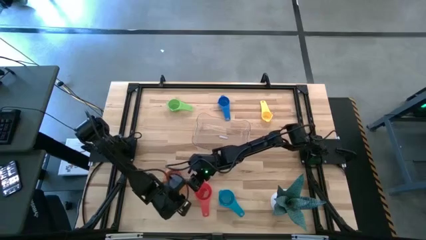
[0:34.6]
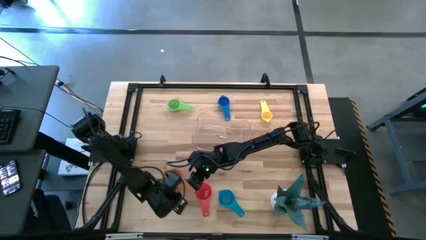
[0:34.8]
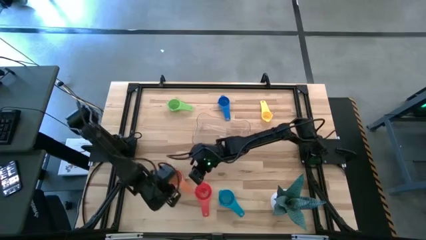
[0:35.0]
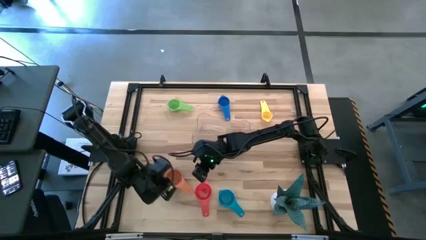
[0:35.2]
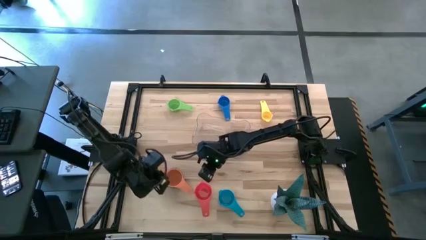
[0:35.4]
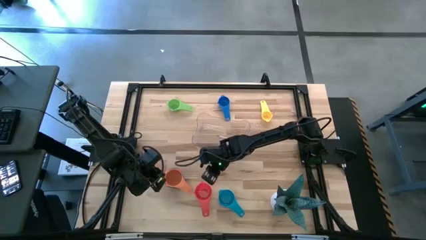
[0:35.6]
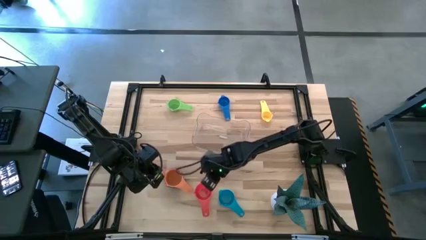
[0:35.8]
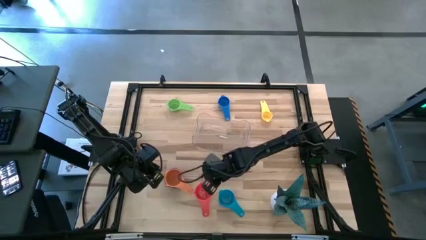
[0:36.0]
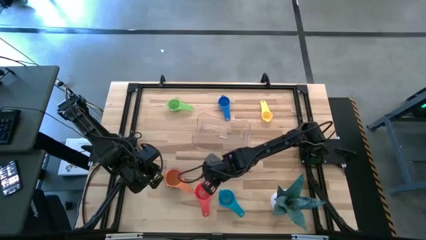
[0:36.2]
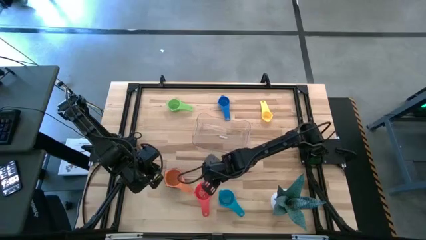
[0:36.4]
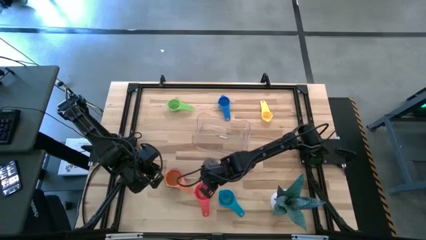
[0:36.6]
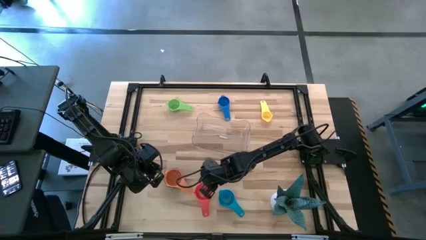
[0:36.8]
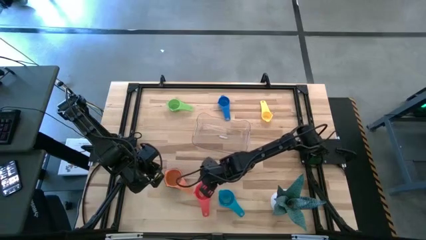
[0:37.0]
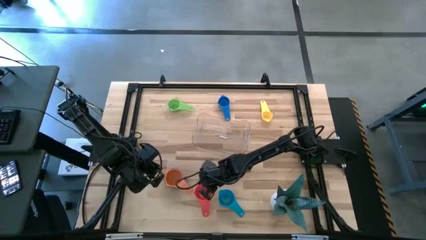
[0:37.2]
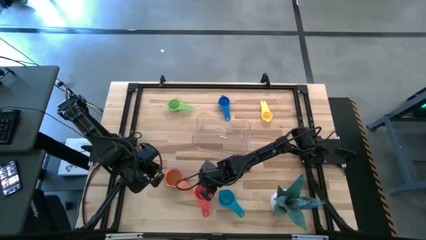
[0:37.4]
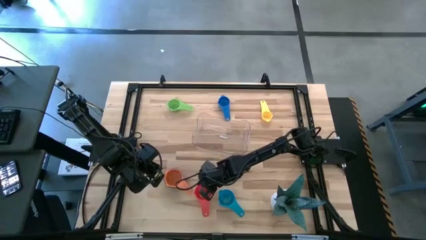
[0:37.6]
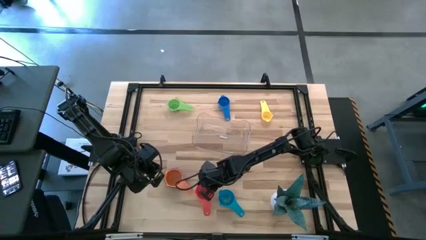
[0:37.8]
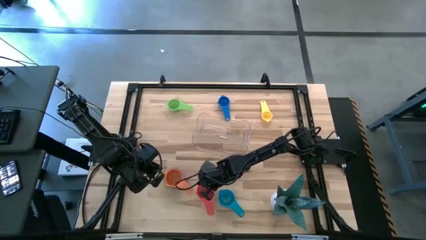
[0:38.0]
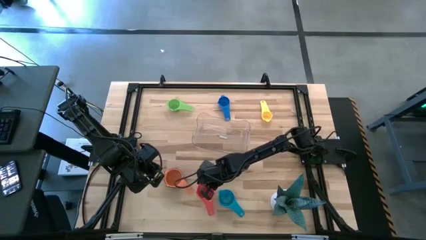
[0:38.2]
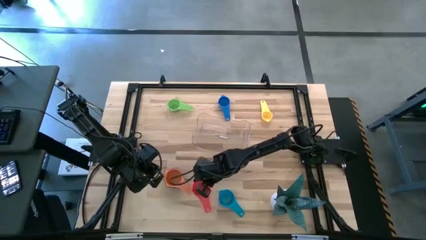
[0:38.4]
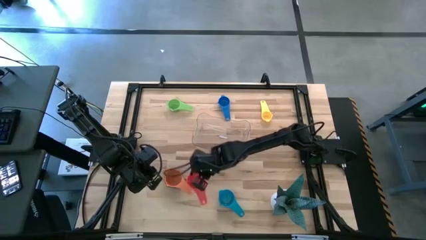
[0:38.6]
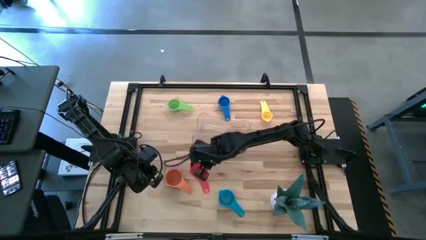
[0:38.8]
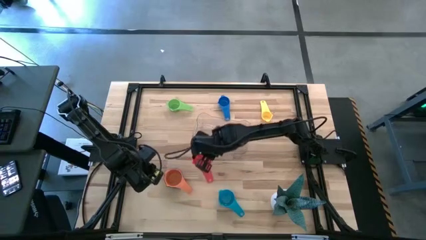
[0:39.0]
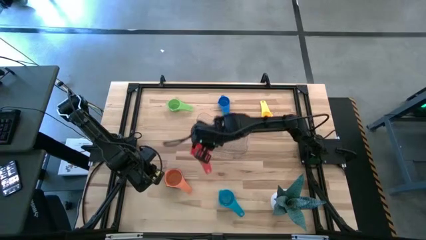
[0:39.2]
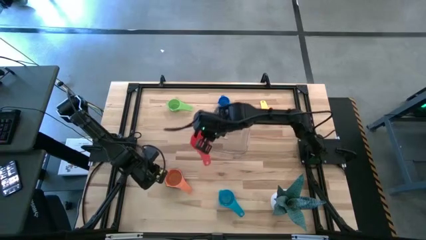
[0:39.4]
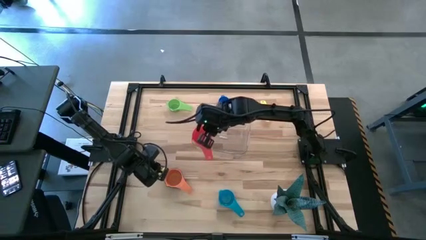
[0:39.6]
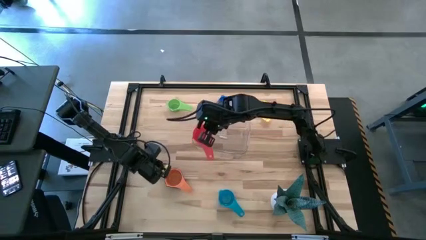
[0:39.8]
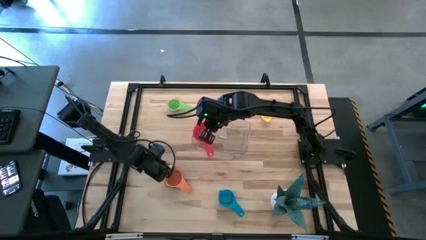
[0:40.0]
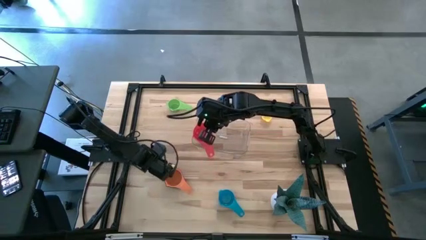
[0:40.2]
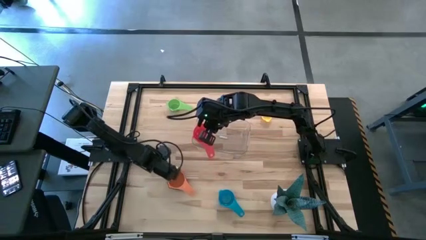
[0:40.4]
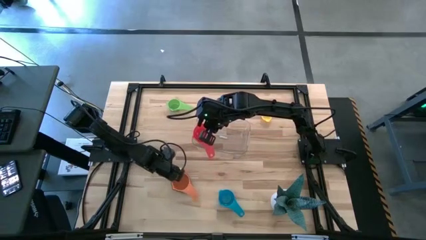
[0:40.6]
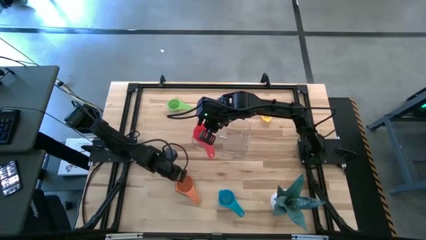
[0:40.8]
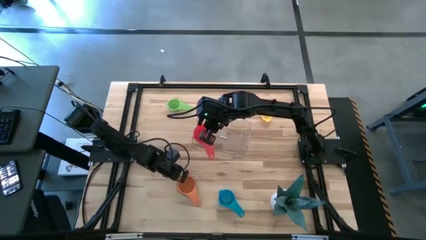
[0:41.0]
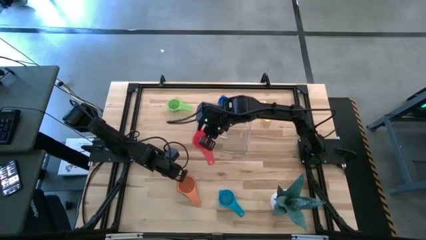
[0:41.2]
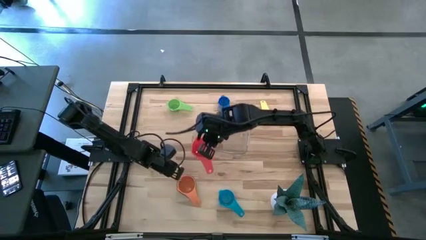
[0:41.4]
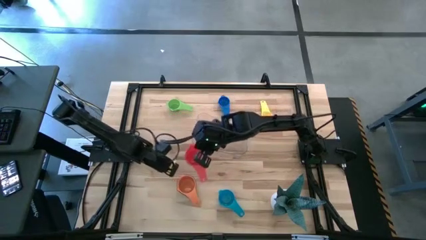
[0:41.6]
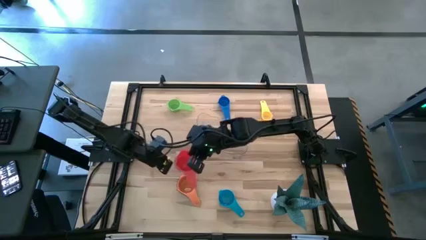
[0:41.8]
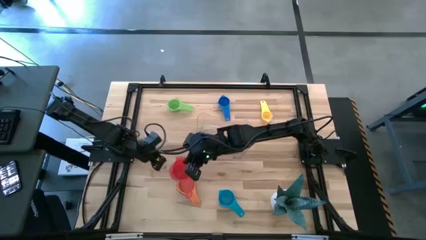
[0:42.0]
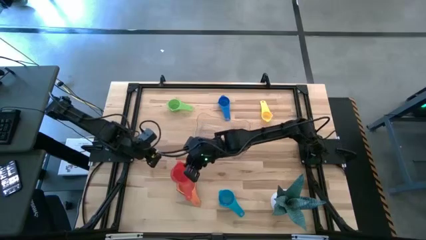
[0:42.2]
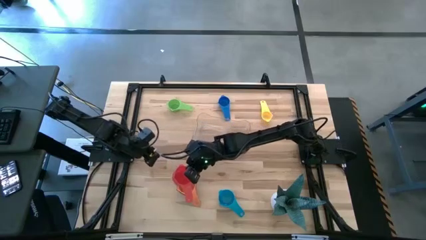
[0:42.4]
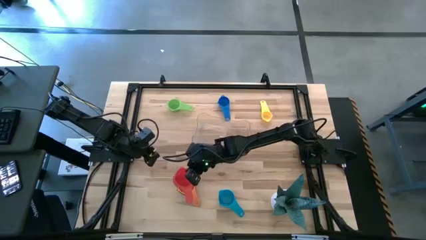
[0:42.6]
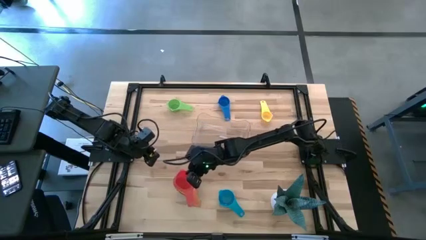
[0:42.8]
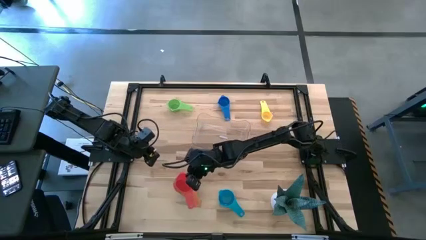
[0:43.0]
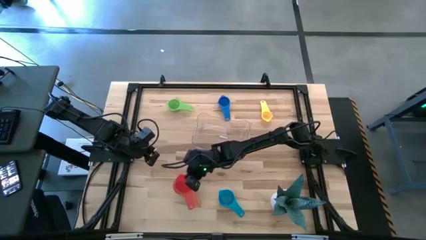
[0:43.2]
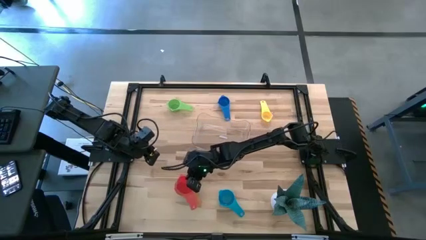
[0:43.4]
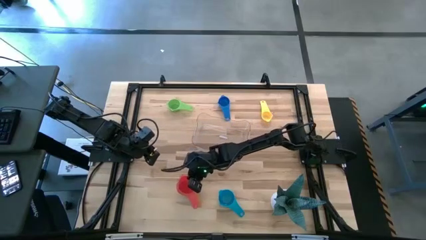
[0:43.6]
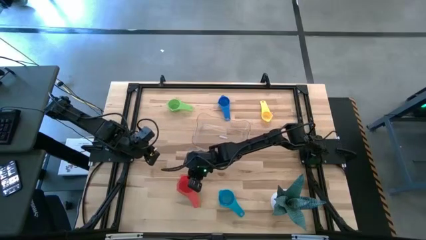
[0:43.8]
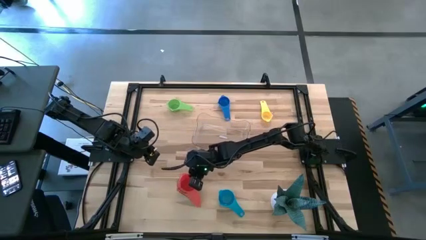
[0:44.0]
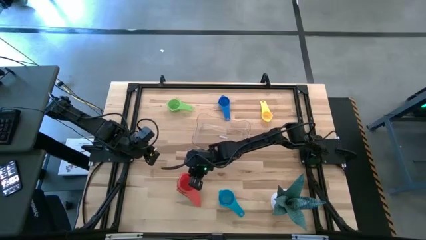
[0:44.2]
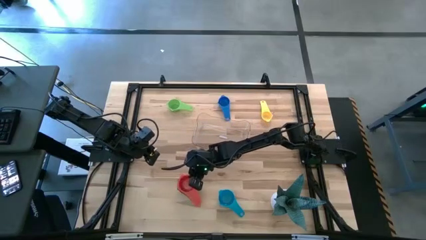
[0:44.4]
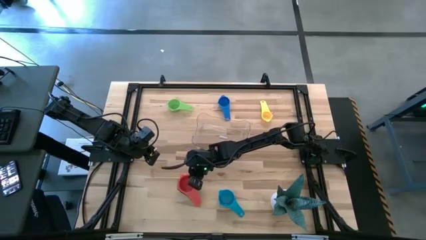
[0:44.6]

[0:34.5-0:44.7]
Task: Nest measuring cups in basket
Stack the red measuring cup on the orange measuring cup

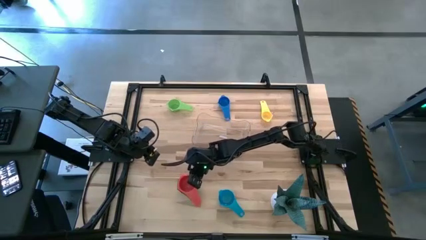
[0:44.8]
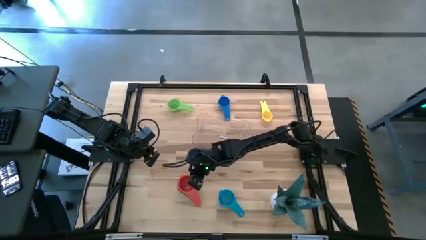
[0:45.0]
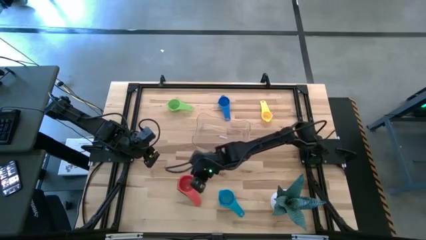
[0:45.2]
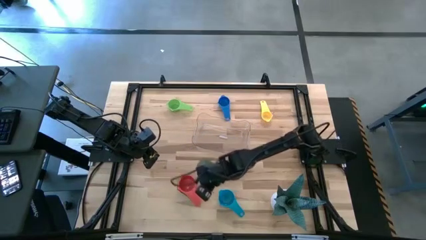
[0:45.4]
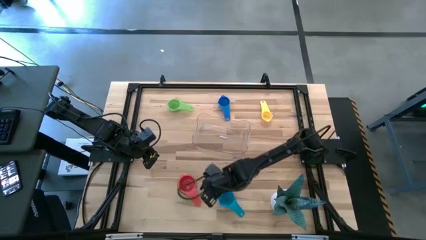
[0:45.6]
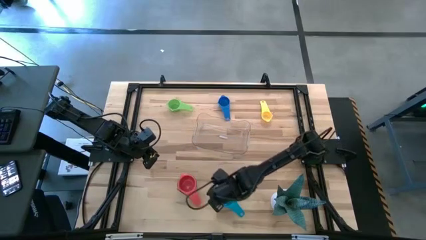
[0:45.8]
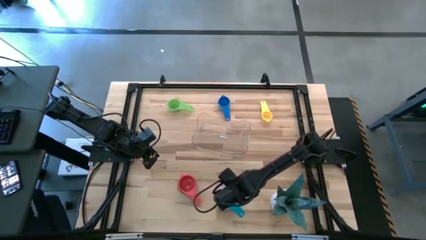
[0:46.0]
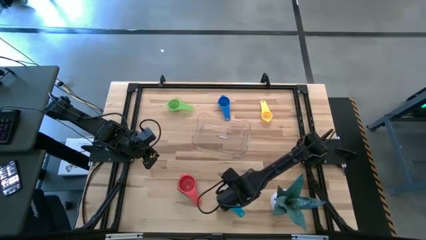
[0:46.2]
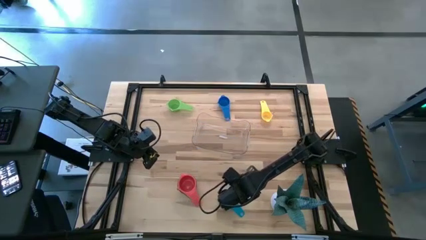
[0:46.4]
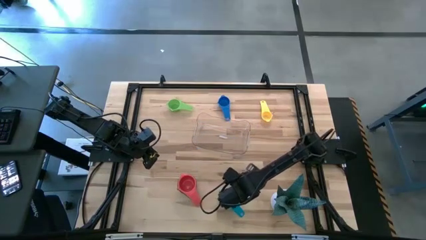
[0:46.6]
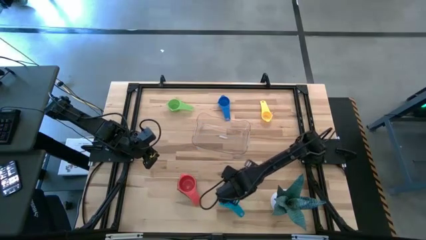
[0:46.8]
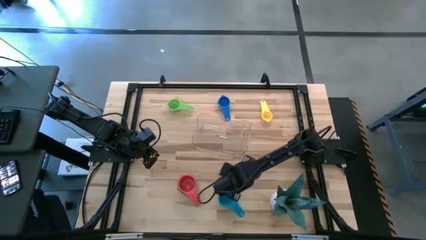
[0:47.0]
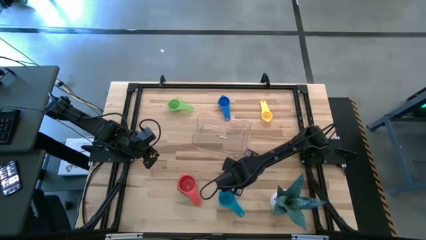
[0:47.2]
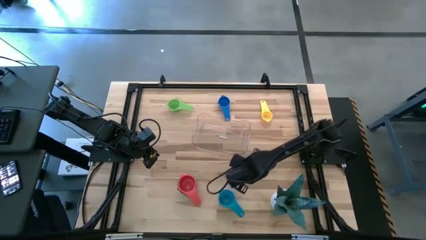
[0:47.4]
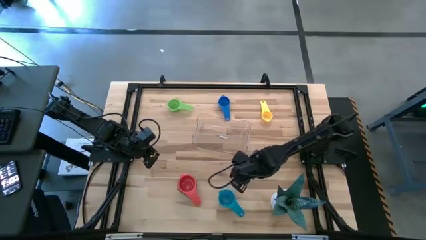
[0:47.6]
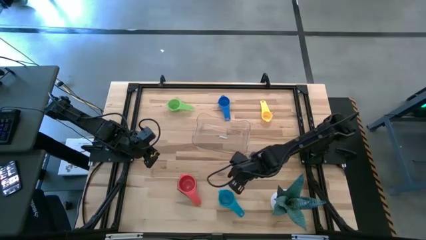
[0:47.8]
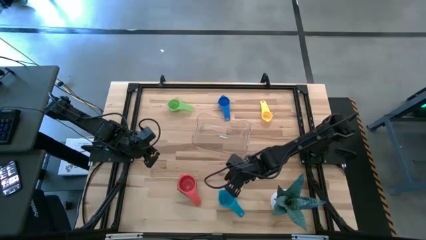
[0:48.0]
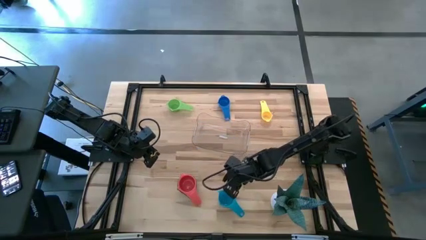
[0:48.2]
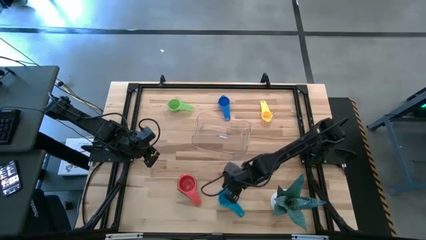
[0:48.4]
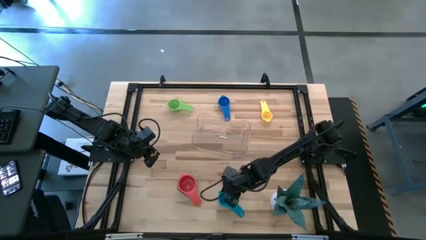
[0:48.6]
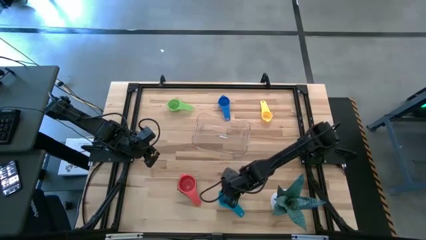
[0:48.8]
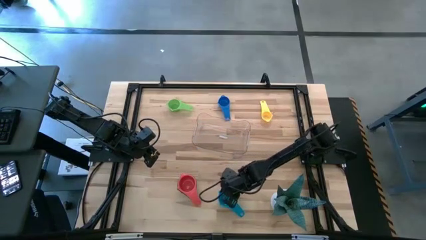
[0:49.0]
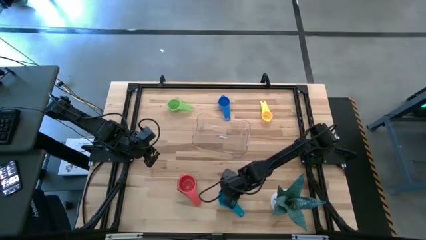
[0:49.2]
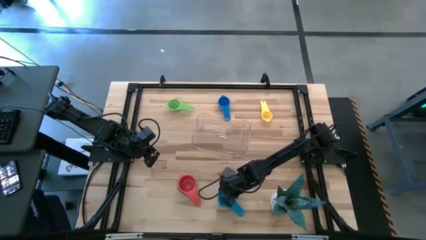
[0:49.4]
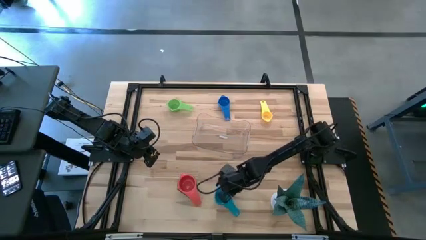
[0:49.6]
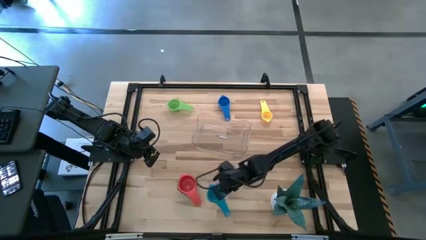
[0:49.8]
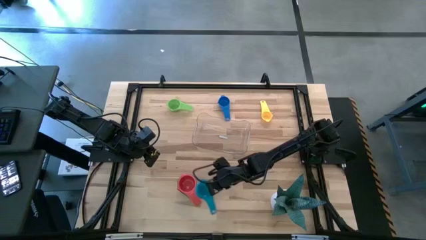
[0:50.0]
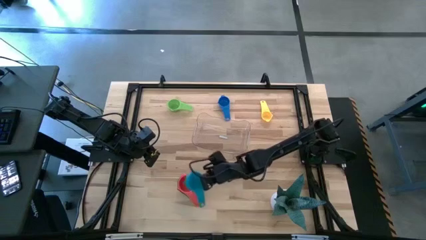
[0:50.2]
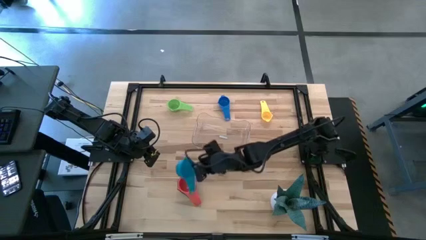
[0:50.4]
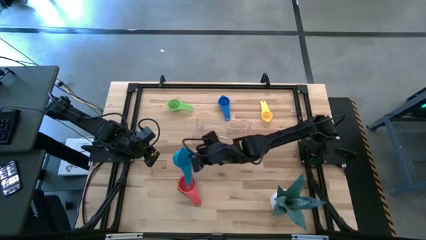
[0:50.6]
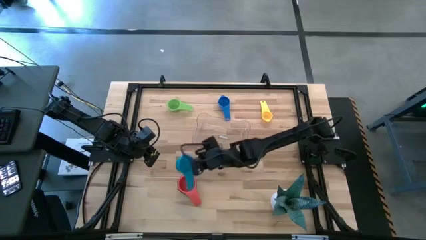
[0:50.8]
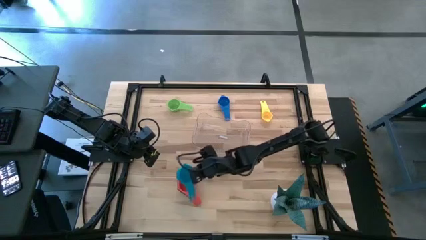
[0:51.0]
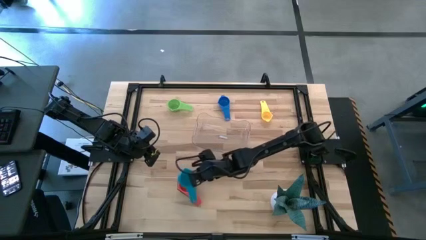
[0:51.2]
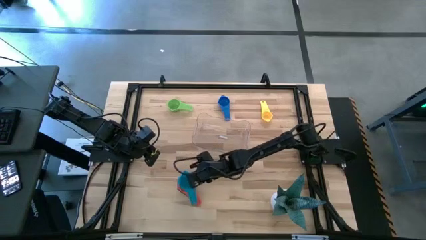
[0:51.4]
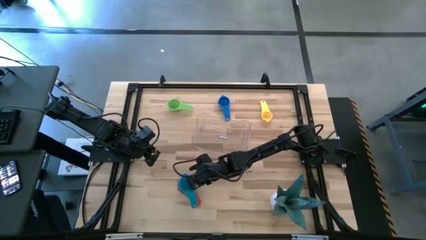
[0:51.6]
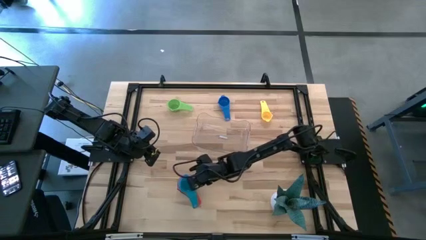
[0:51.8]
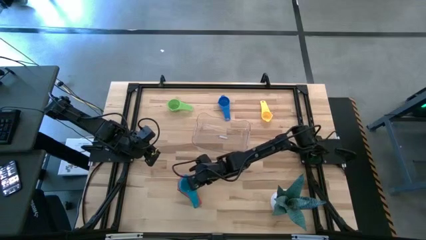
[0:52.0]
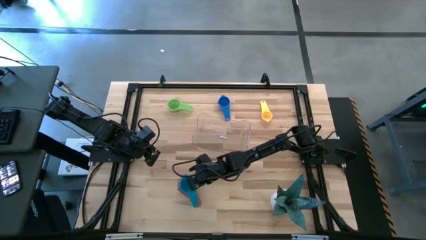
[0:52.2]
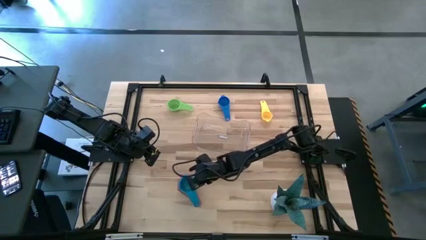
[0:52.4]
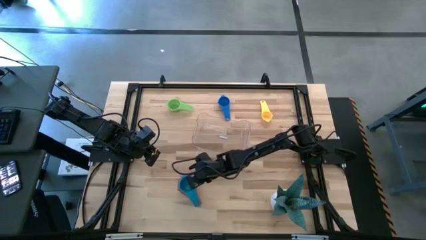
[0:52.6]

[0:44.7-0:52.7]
Stack the light blue measuring cup on the red measuring cup
